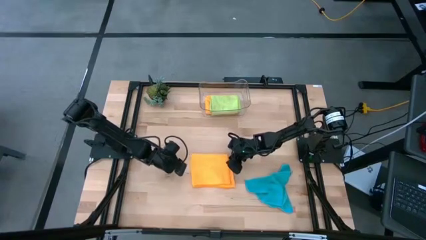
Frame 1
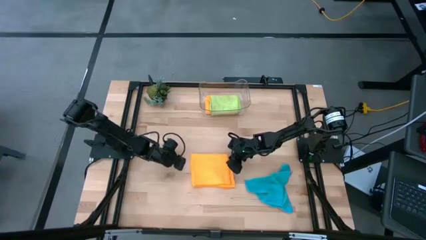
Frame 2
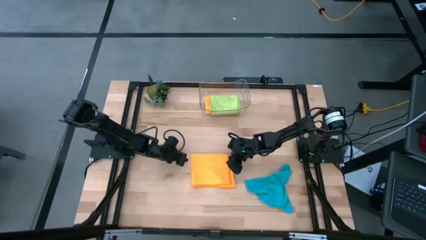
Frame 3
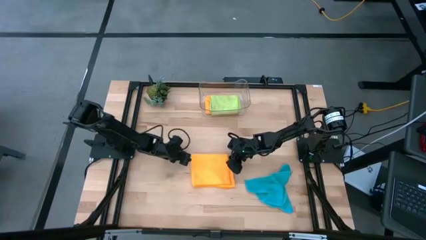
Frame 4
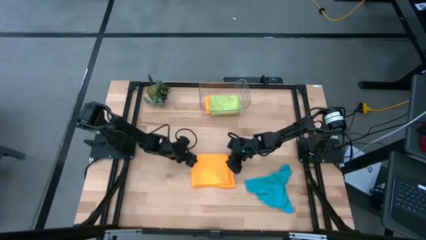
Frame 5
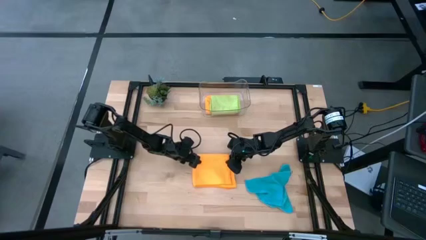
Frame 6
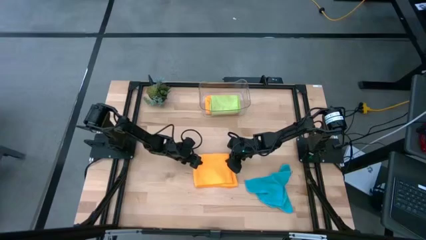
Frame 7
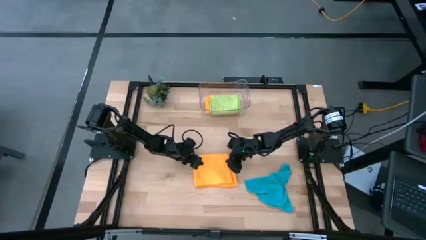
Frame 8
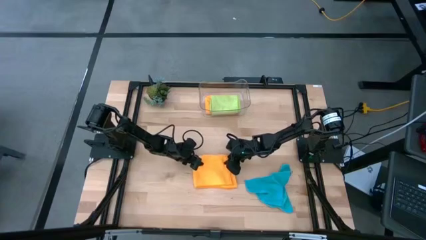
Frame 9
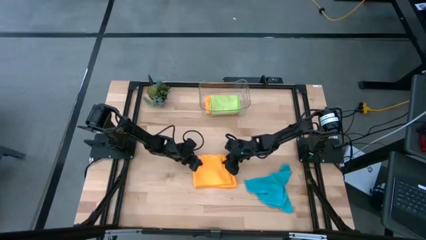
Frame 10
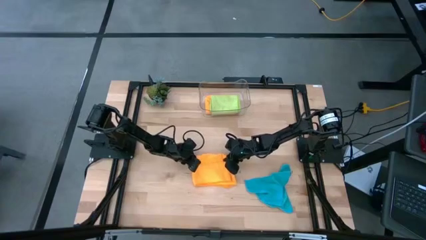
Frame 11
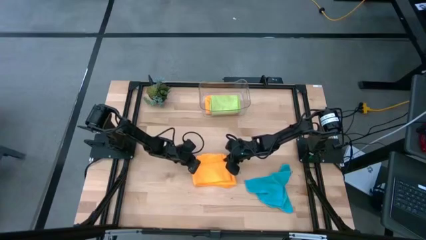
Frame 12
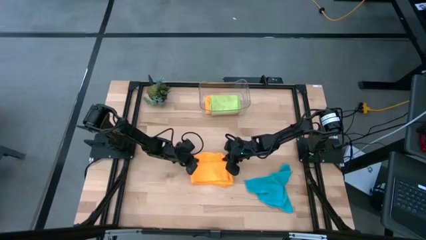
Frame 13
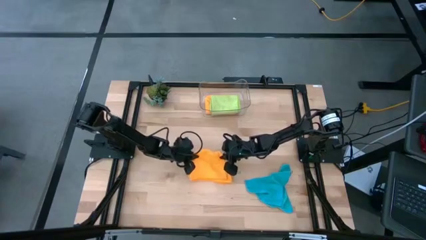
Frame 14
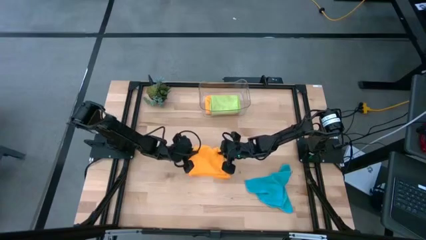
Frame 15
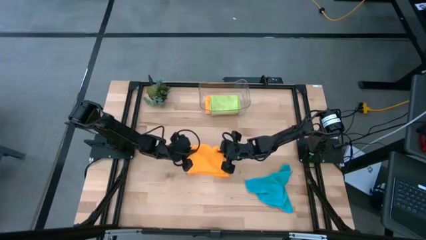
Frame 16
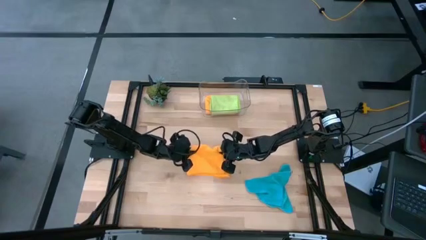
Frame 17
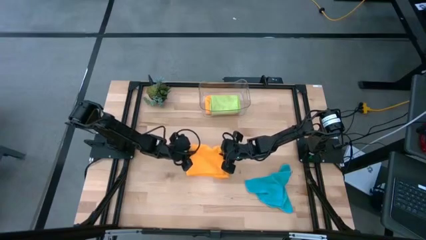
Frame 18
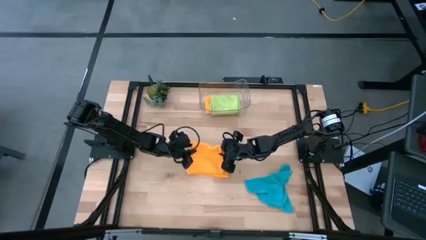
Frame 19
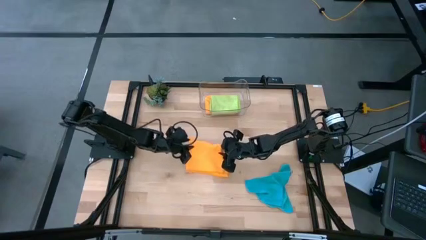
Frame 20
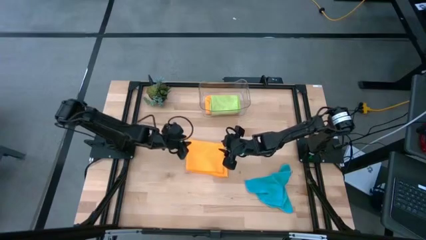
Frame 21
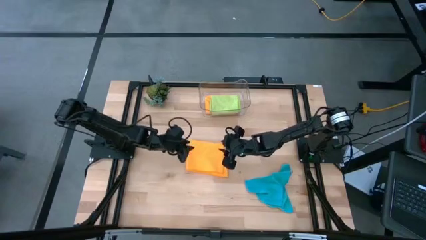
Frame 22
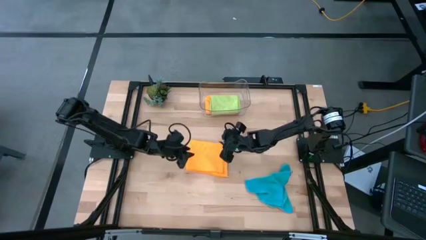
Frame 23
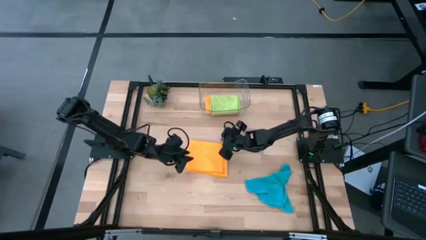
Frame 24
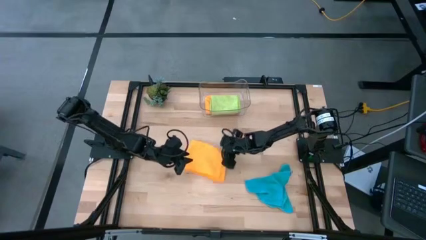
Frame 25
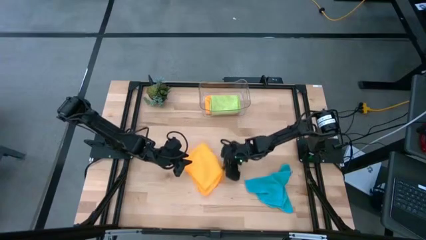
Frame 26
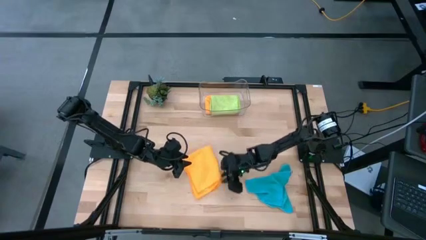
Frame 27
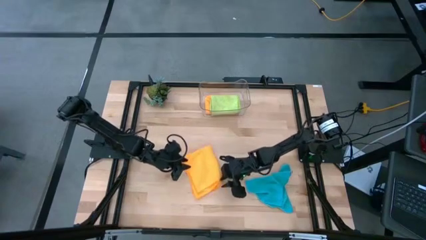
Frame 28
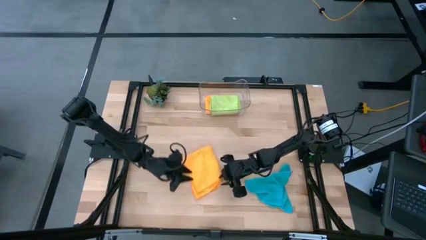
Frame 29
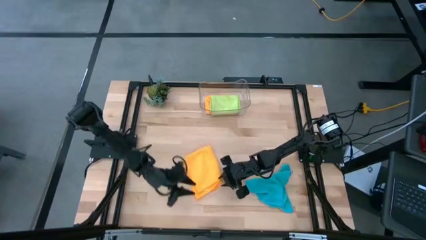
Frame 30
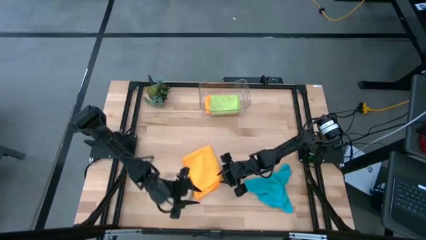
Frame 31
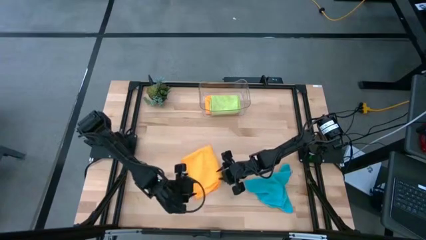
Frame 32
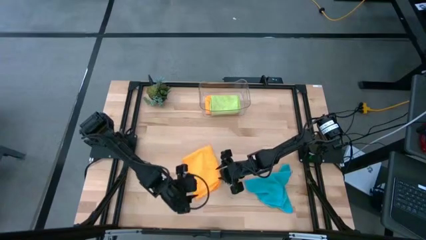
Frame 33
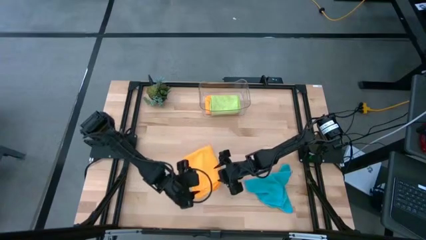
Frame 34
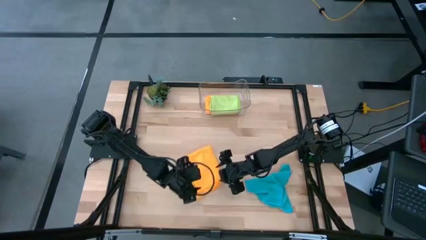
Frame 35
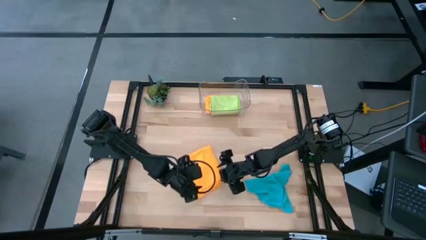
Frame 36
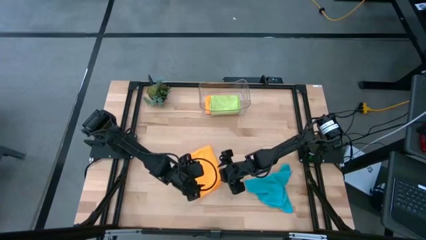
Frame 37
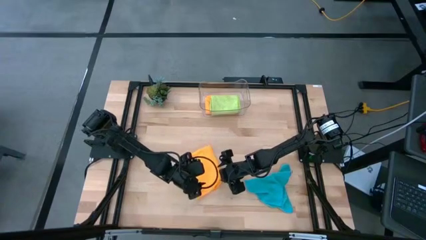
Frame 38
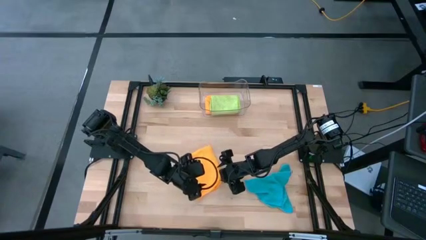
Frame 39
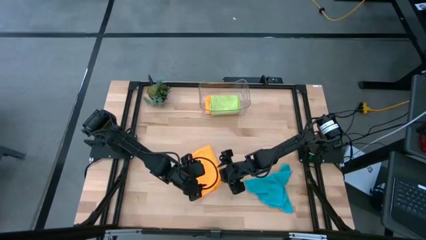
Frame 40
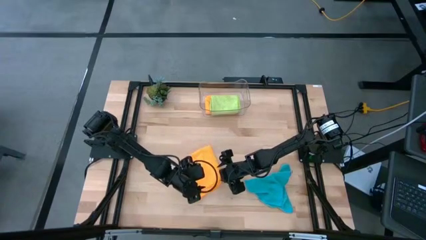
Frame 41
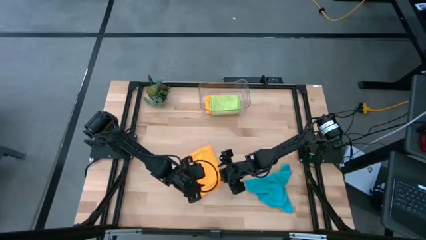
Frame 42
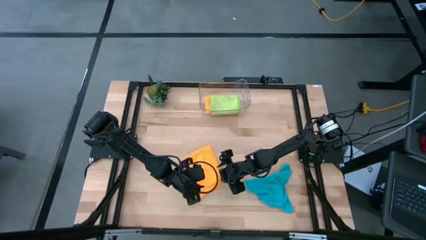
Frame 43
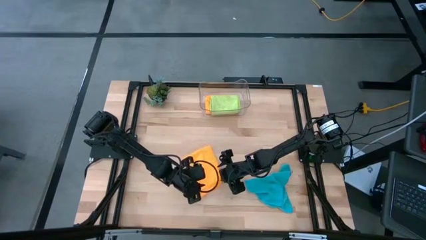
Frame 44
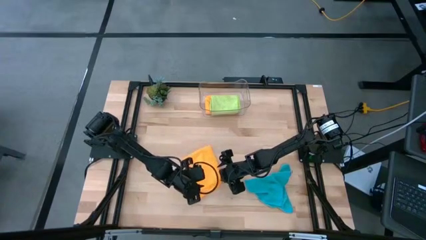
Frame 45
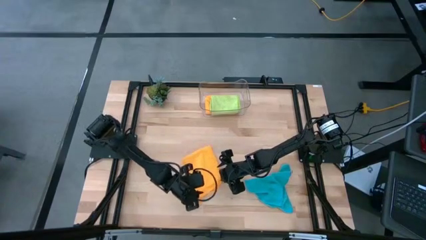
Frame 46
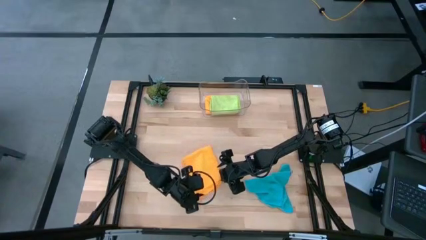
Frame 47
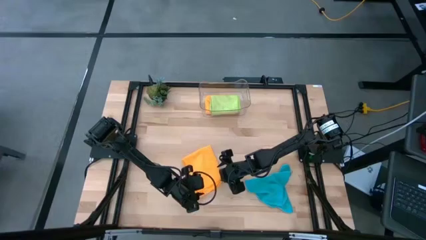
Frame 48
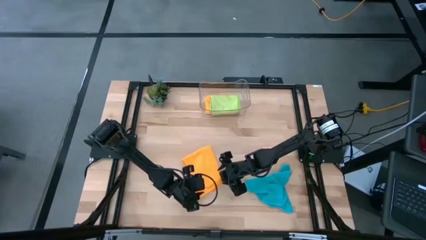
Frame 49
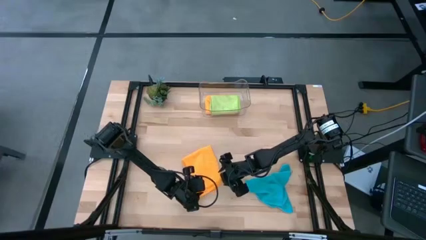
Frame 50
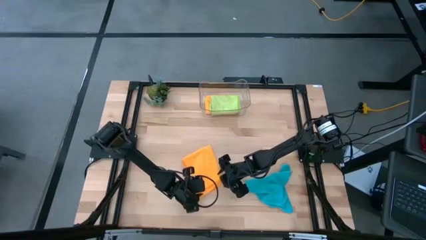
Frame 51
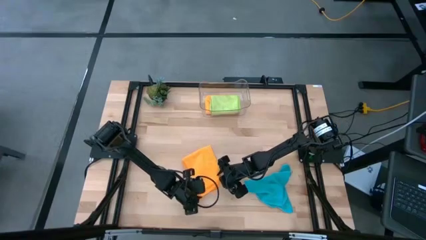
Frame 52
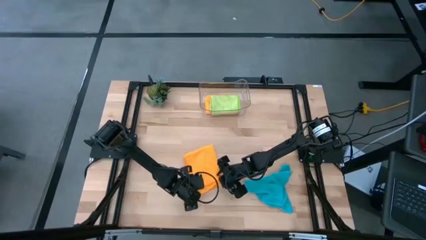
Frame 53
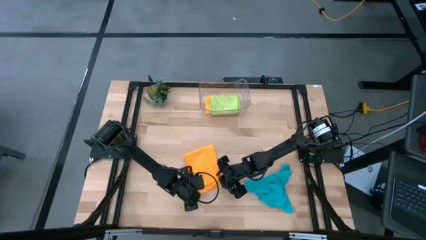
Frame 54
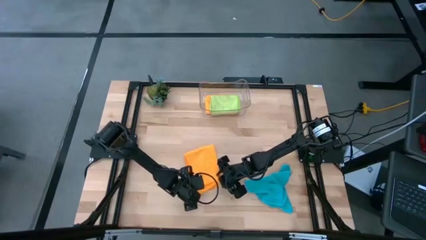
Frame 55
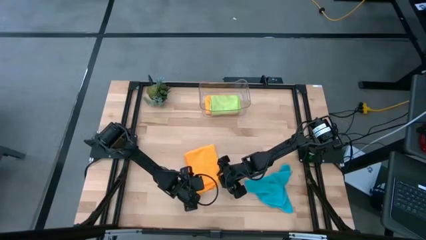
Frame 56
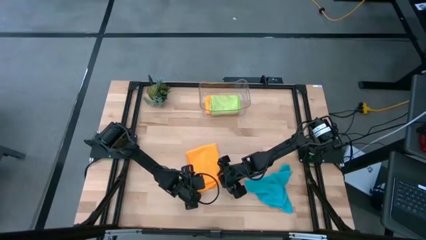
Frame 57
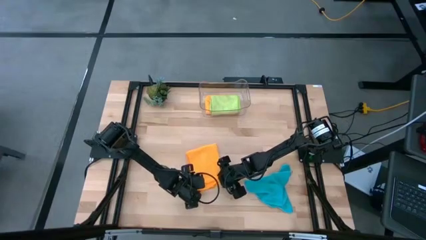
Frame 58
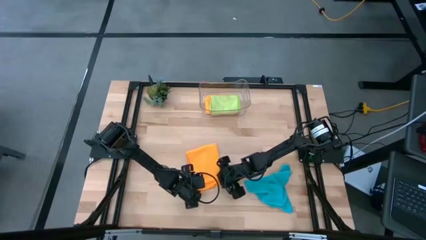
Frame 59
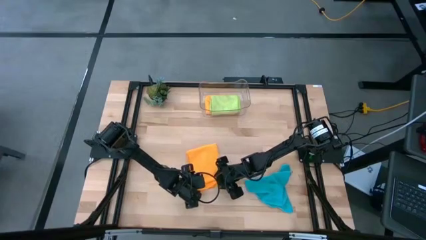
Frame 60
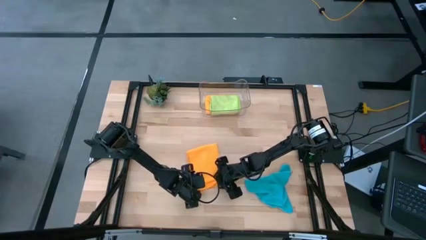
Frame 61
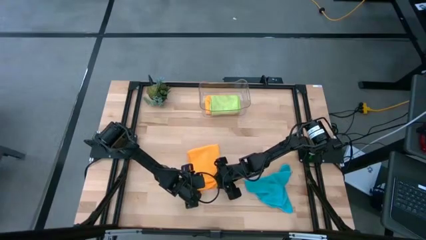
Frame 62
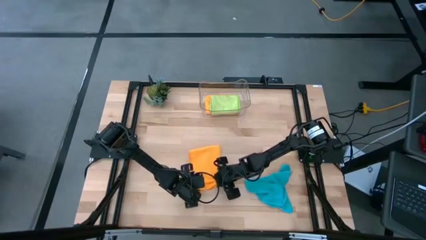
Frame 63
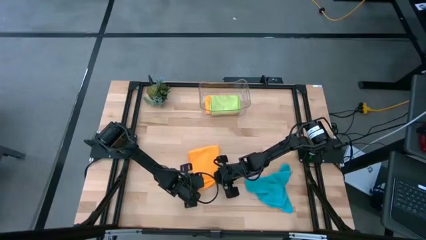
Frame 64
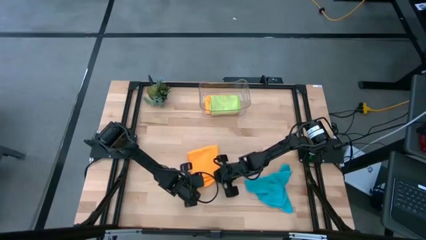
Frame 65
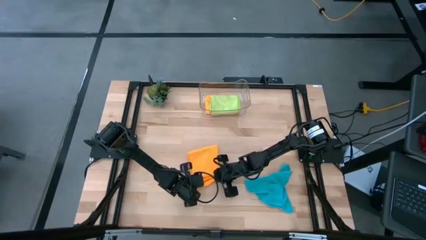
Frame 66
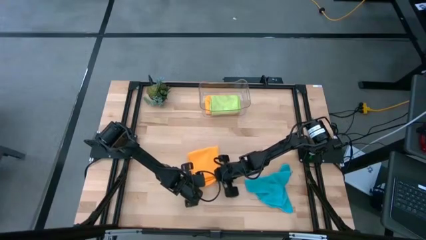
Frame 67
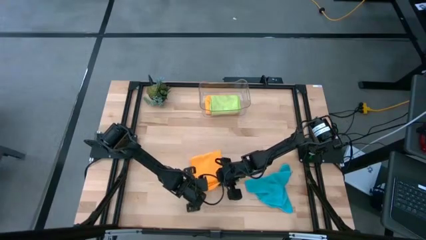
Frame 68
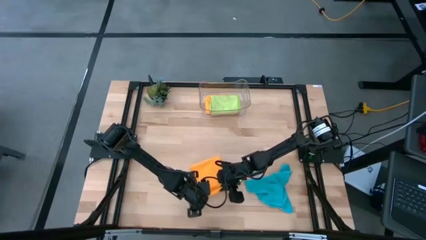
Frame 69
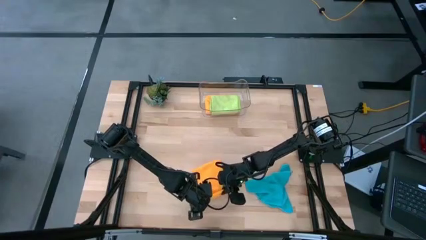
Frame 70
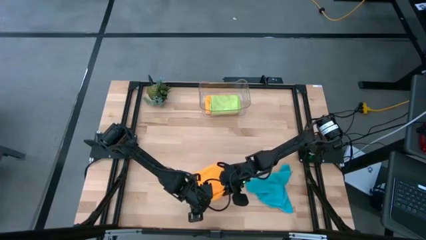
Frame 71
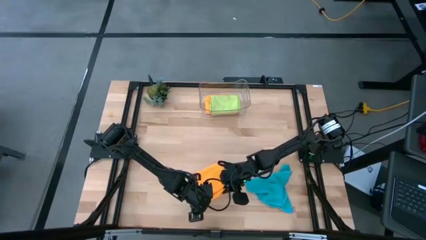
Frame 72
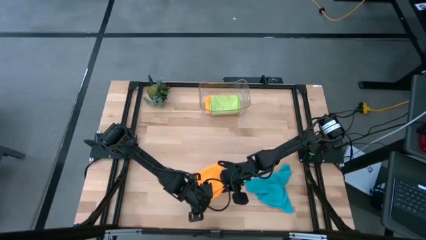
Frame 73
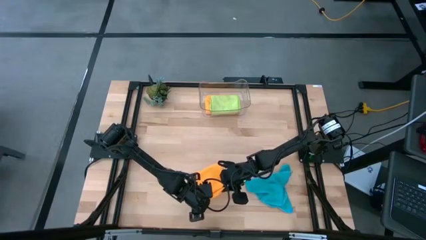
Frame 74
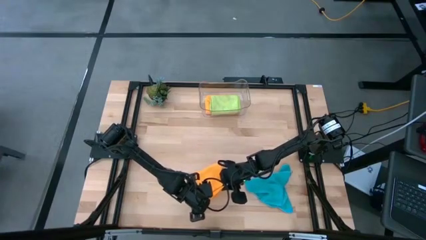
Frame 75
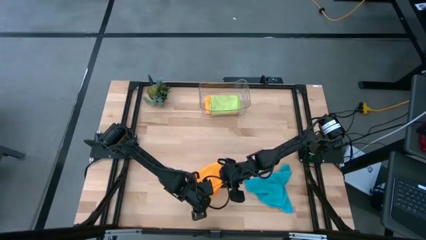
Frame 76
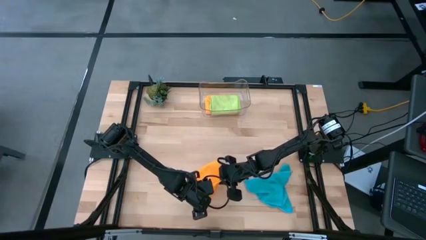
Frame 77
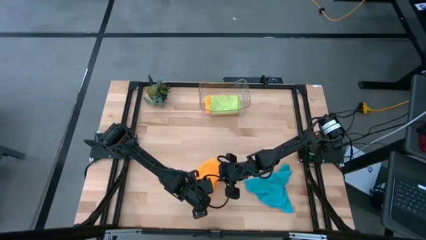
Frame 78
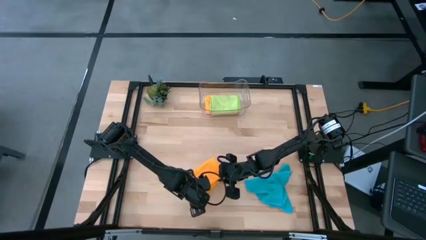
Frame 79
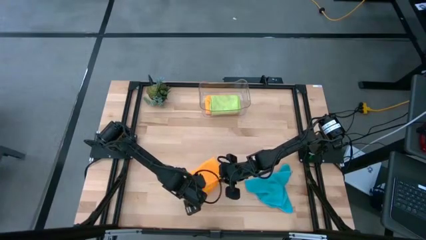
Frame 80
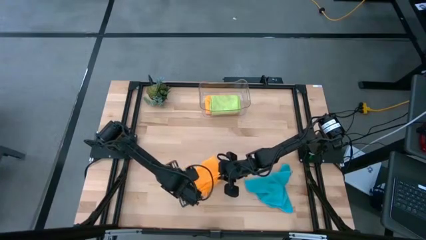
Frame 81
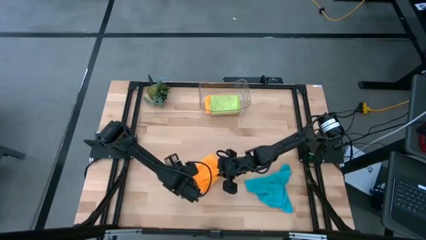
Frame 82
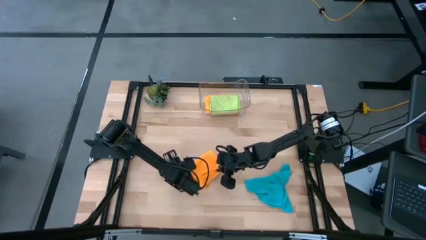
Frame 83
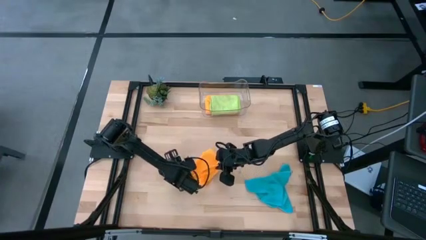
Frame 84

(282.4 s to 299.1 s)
Task: Fold microfiber towels
Fold the orange microfiber cloth

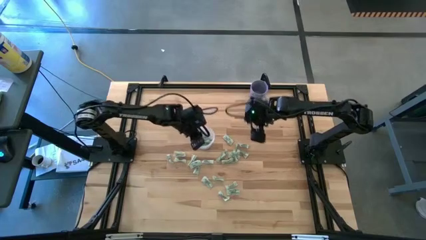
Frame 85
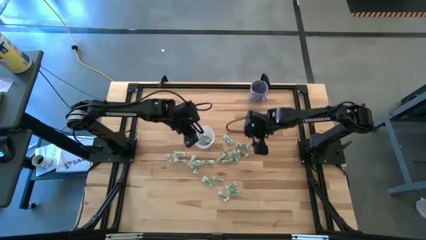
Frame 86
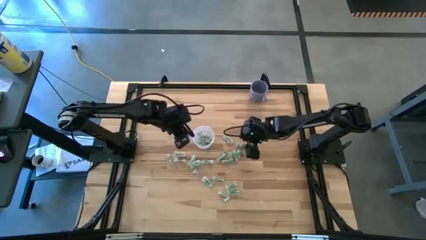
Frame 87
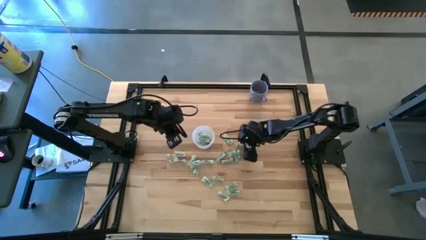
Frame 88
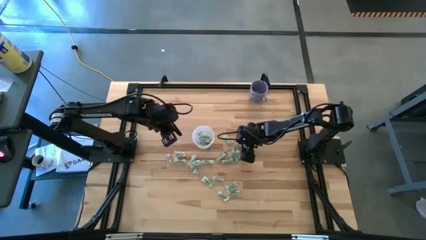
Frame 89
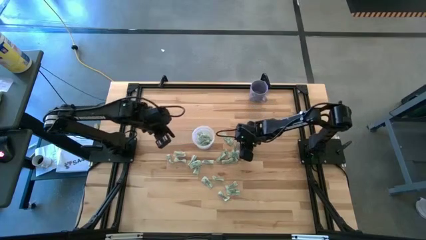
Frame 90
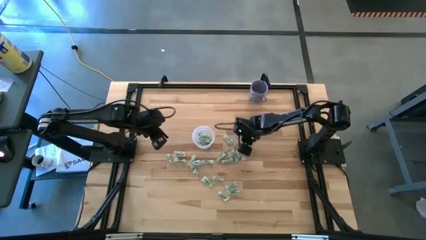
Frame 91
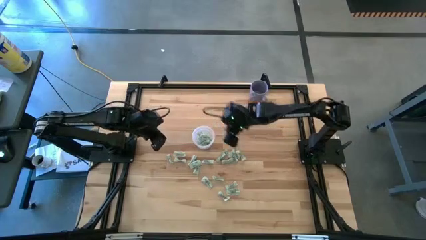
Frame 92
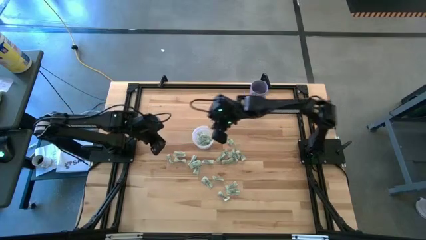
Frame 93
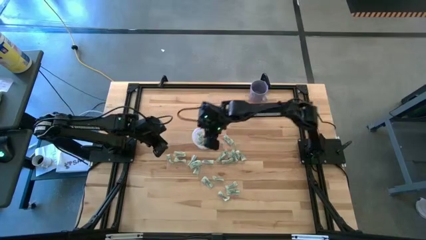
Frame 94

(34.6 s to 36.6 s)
Task: Pick and place Stevia / Truvia into bins
Put the white stevia packet into the transparent container
